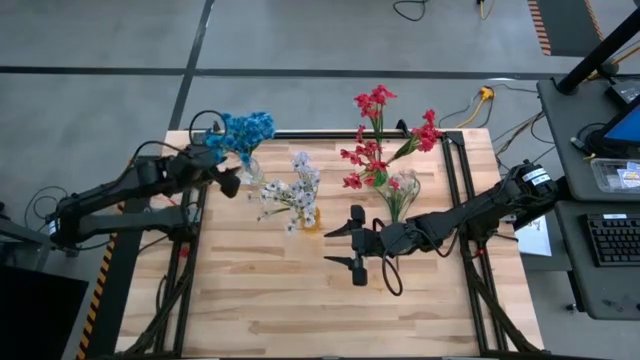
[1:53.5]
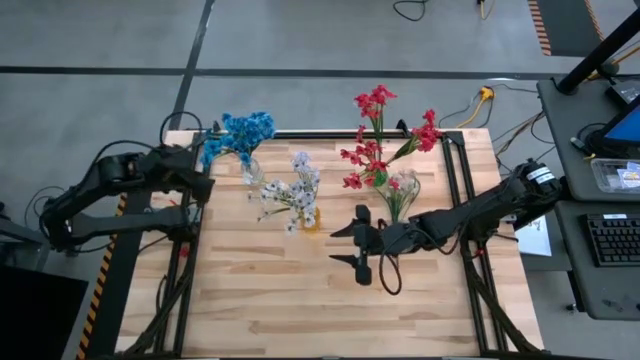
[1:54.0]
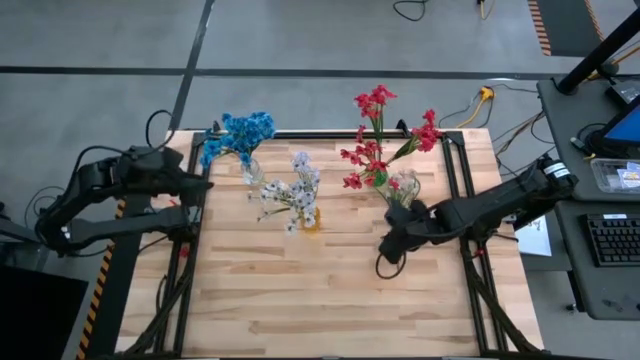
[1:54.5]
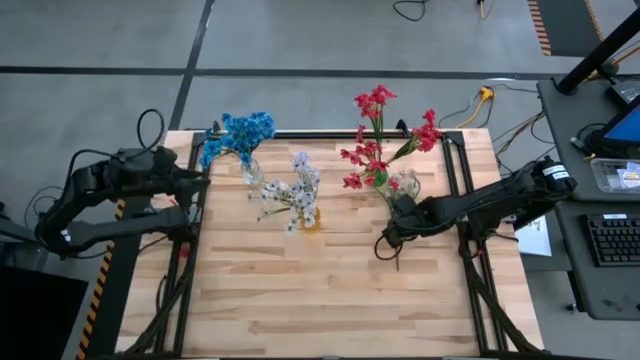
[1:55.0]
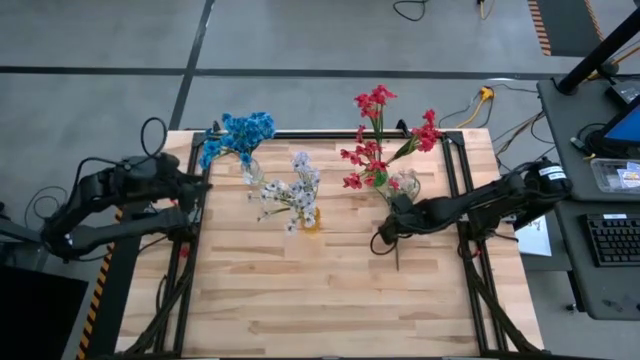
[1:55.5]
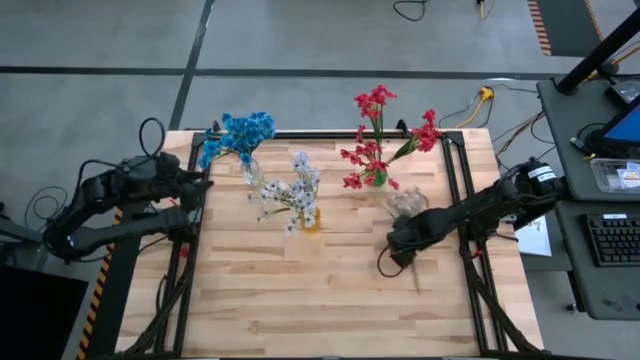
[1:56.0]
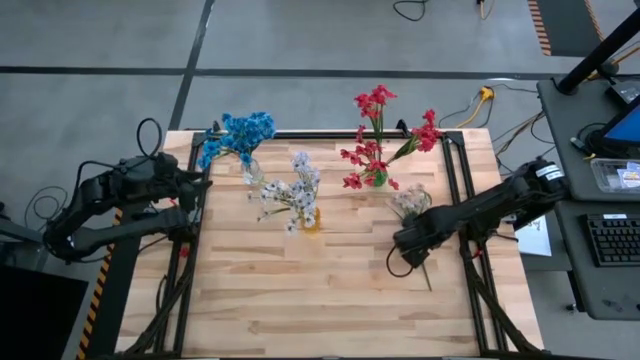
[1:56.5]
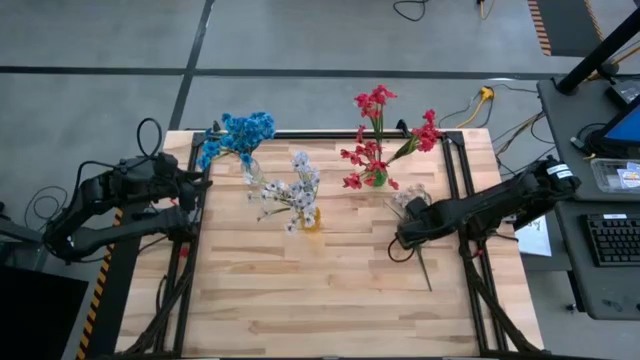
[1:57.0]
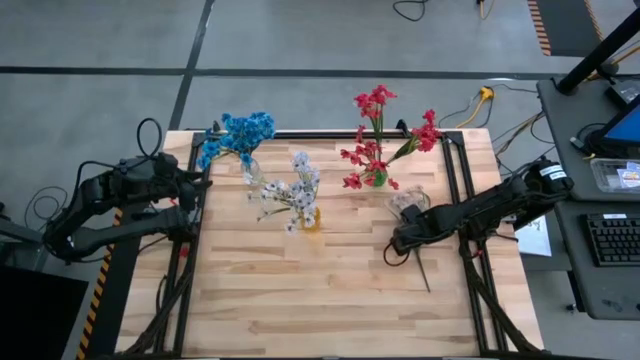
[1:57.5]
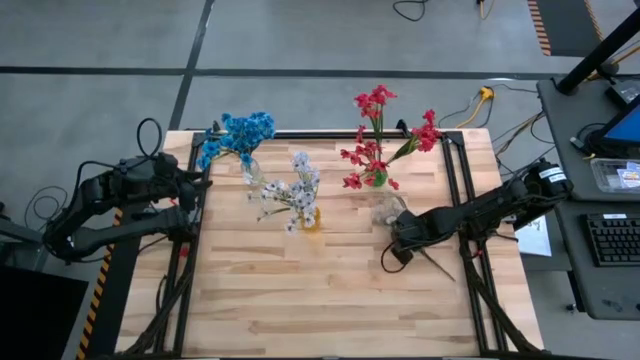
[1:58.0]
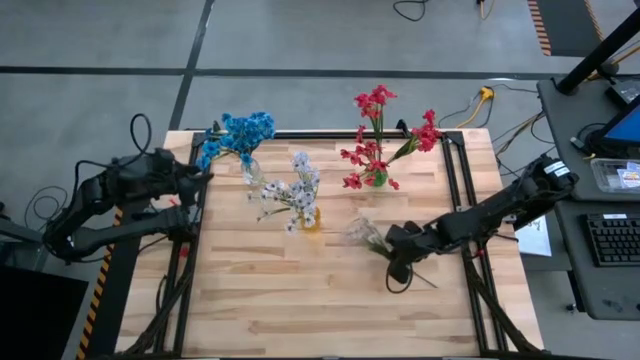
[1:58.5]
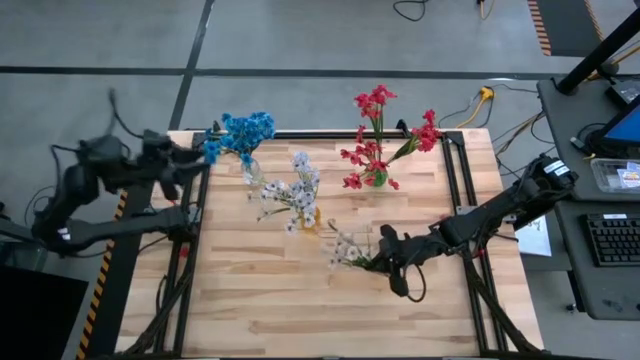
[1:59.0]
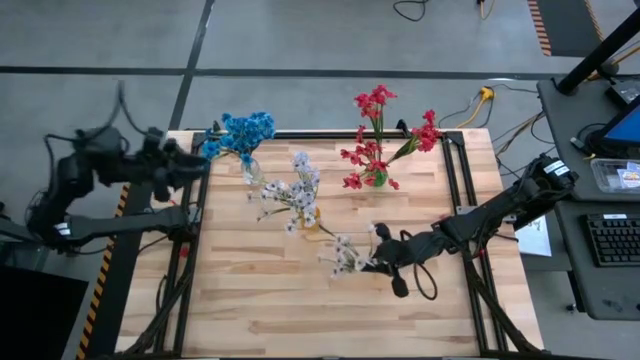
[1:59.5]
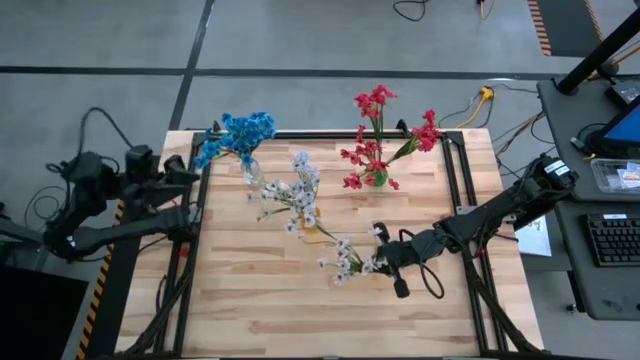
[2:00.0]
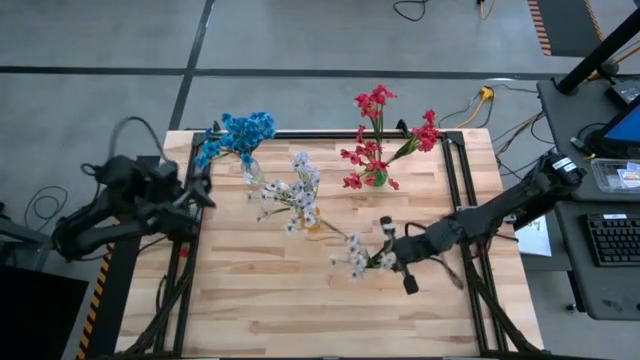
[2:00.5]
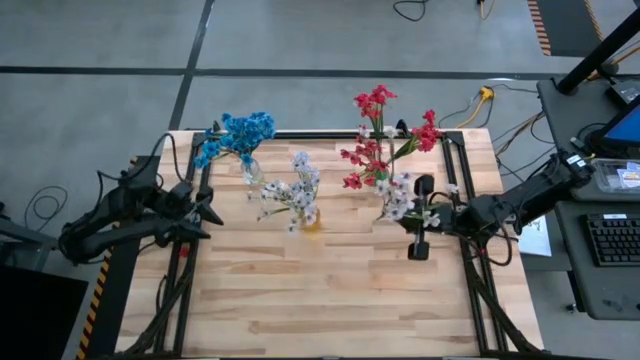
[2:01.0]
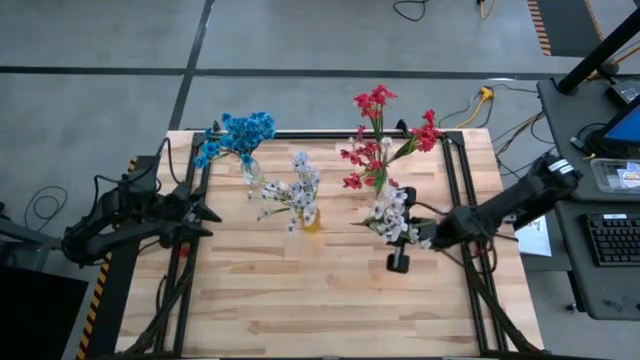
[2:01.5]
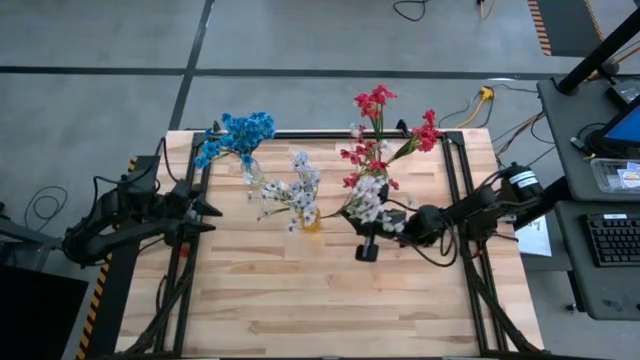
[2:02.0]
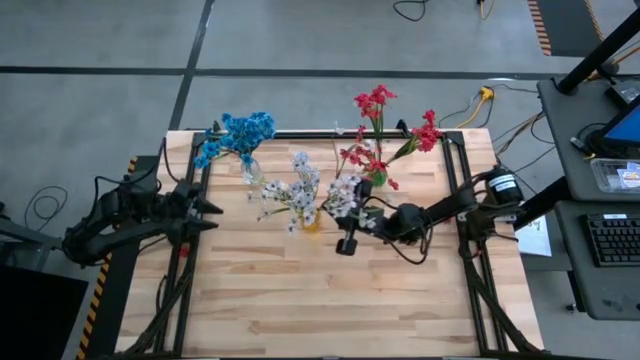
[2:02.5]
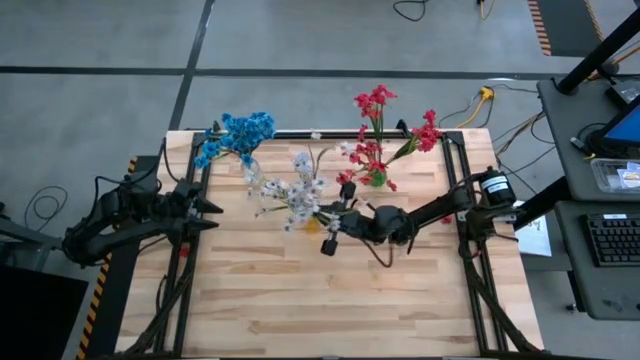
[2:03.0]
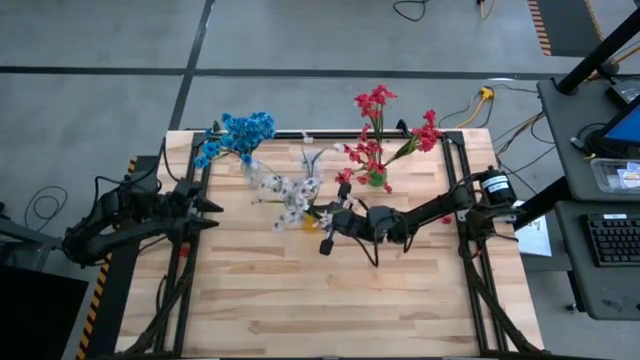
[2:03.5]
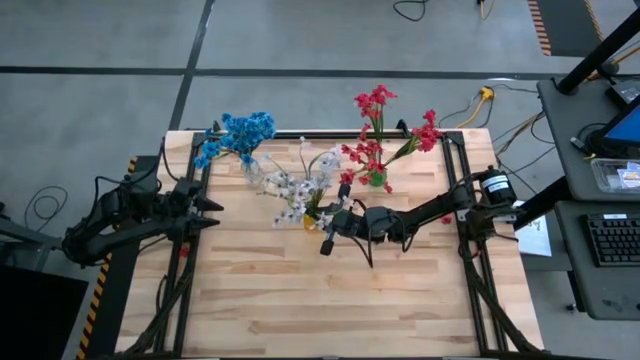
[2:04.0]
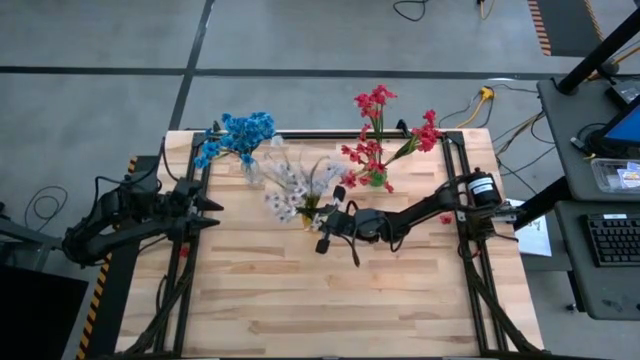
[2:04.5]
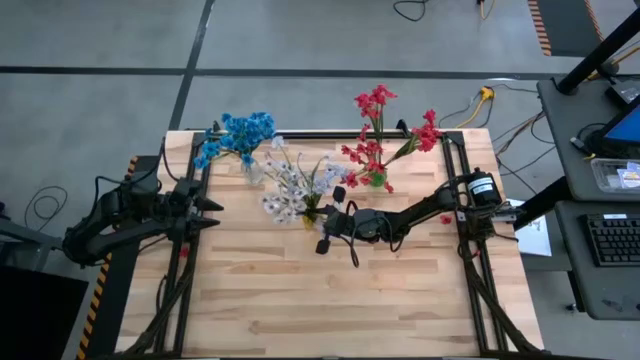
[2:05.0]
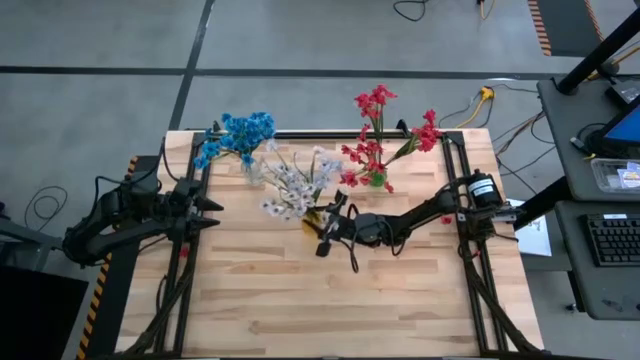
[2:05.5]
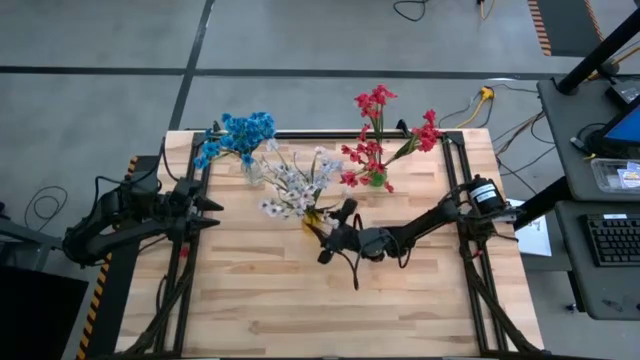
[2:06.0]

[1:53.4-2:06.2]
Task: Sort flowers into vase by color
Put the white flowers into the yellow vase

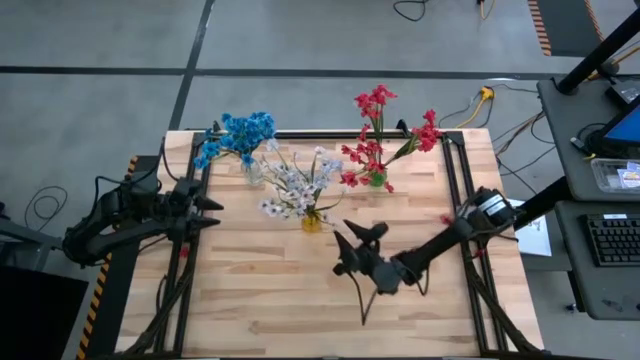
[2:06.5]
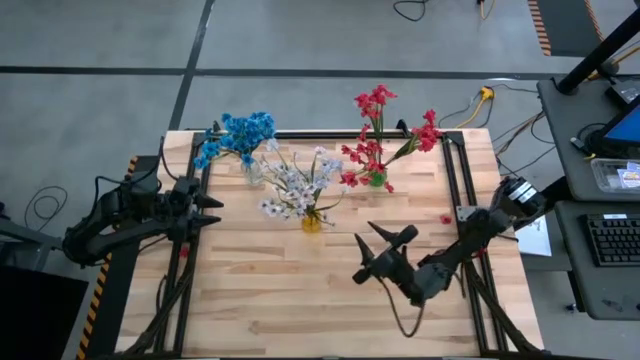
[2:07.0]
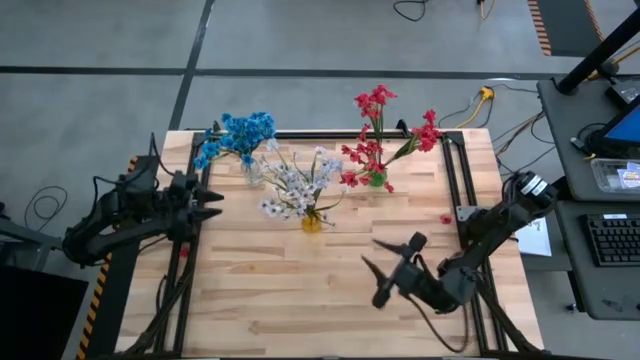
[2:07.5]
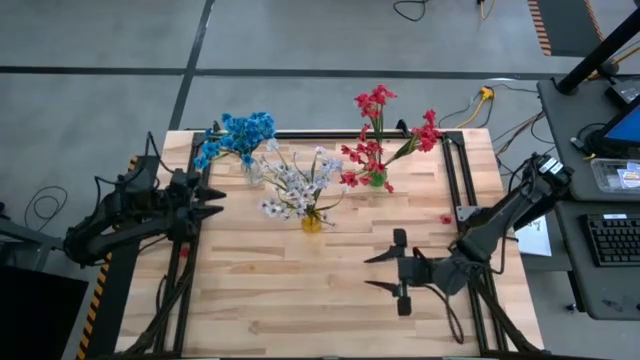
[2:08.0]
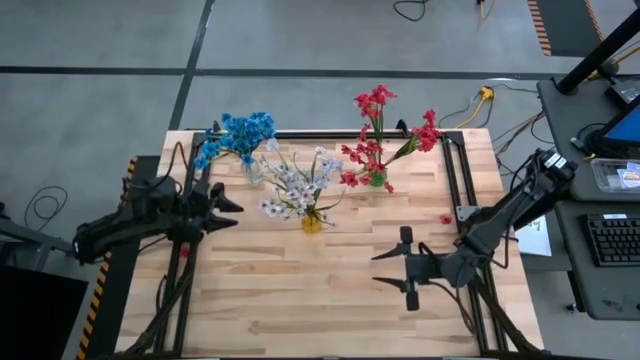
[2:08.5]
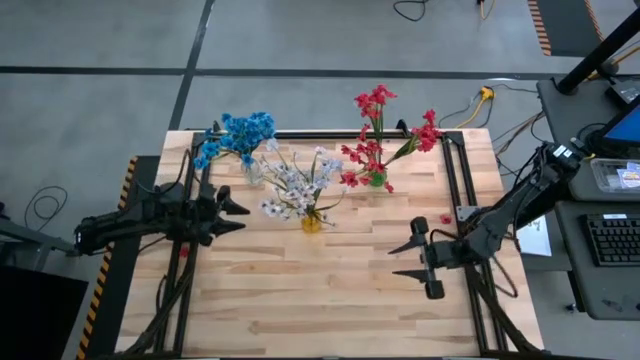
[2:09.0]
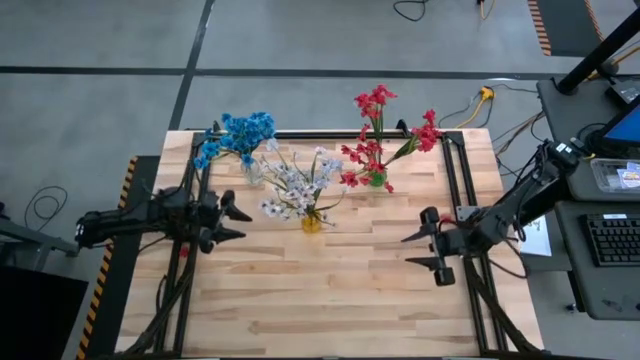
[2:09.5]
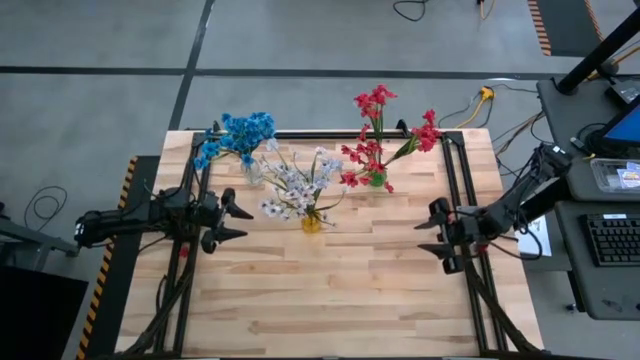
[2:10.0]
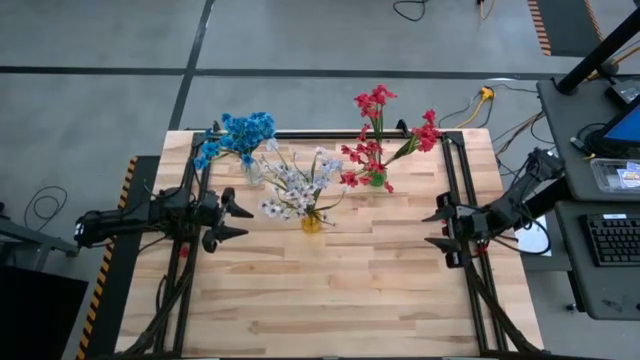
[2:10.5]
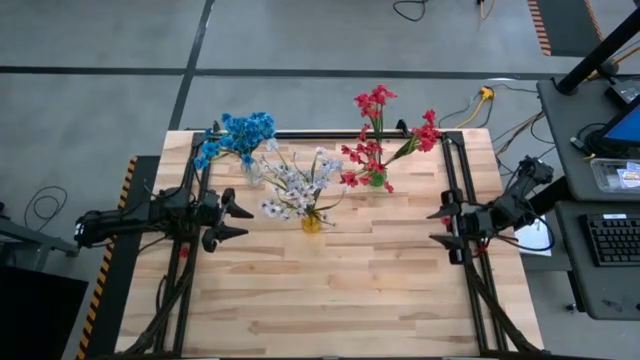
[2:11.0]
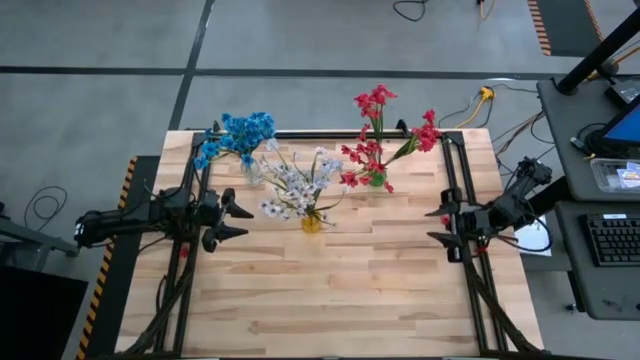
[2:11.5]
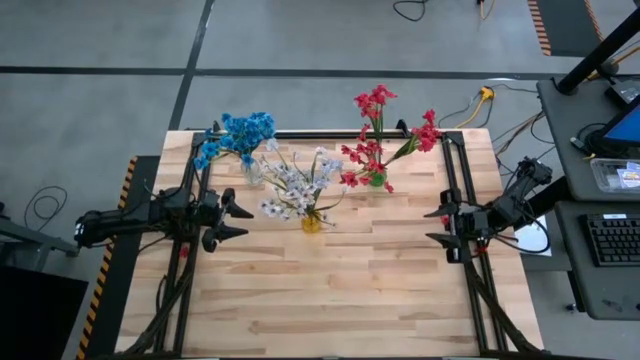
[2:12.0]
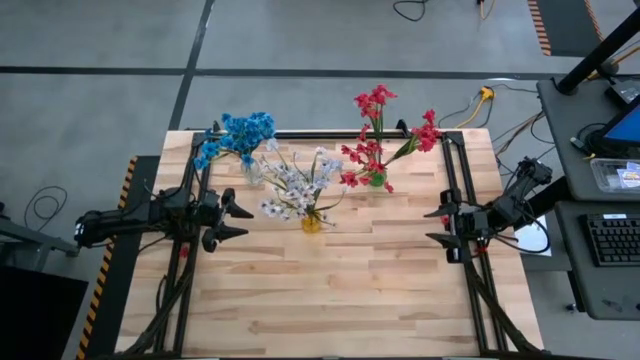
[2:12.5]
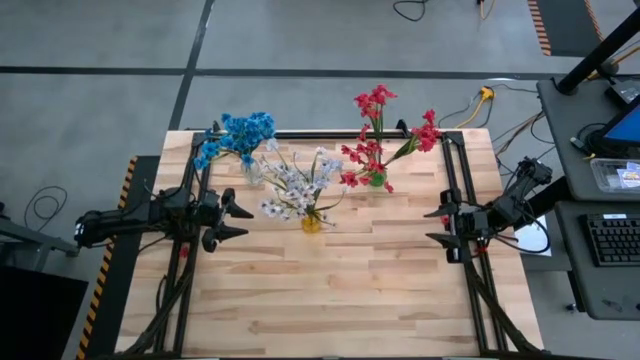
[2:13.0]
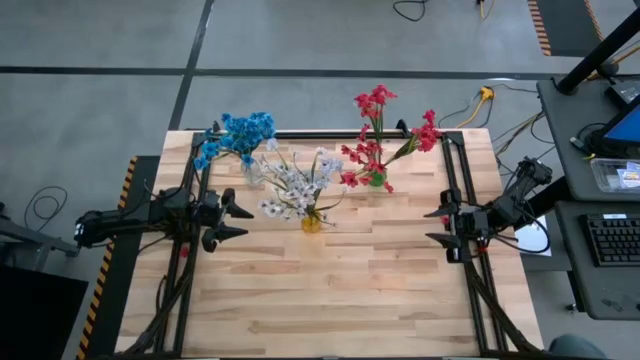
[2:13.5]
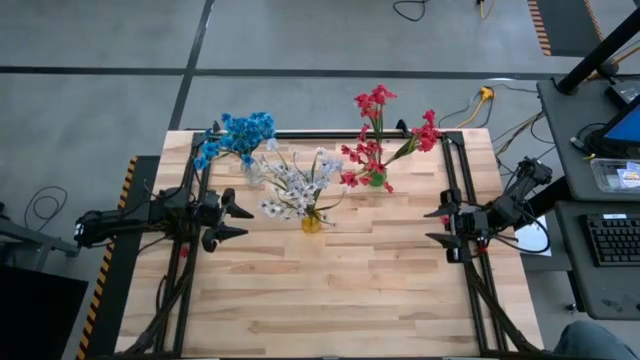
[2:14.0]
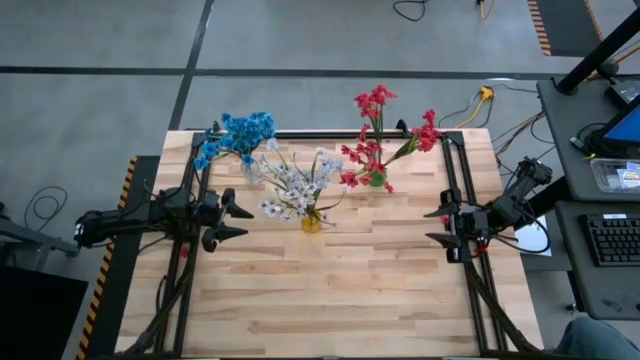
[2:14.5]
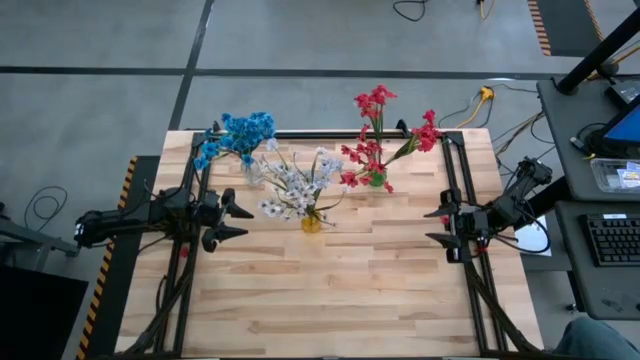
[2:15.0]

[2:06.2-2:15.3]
Return to Home Position
